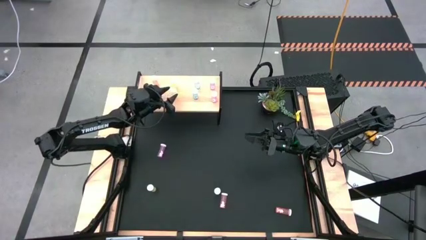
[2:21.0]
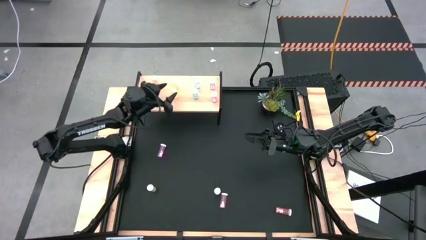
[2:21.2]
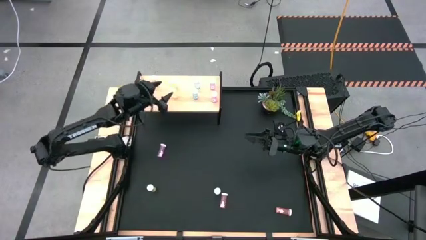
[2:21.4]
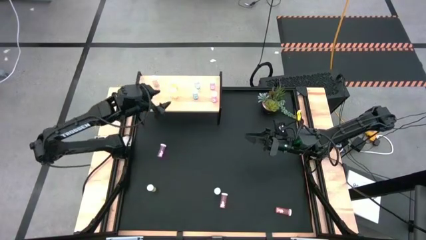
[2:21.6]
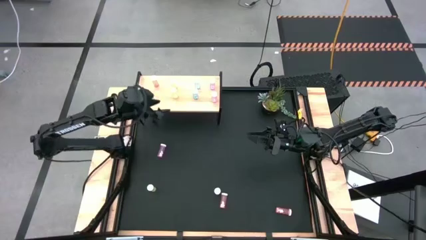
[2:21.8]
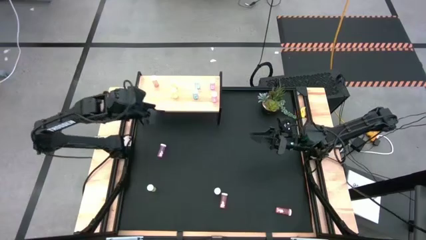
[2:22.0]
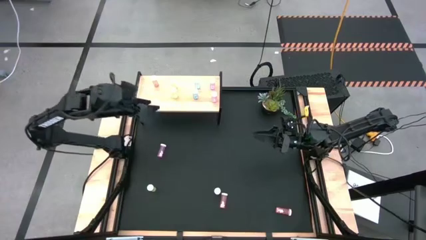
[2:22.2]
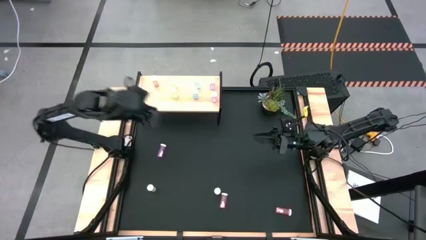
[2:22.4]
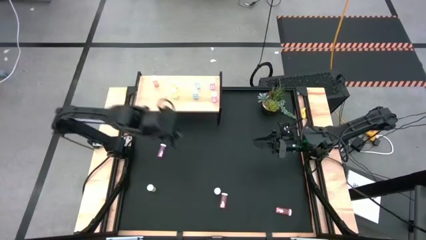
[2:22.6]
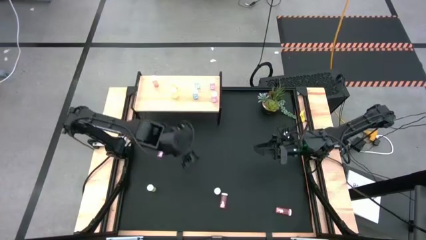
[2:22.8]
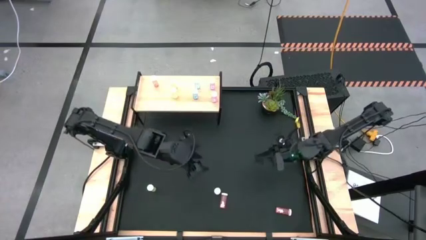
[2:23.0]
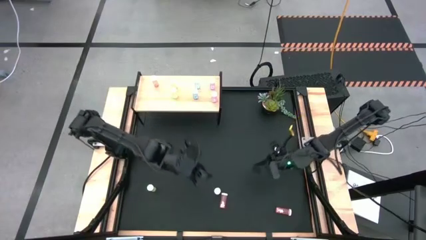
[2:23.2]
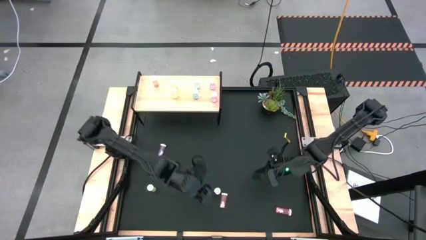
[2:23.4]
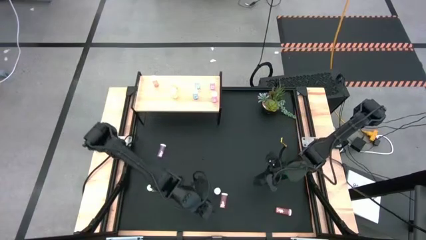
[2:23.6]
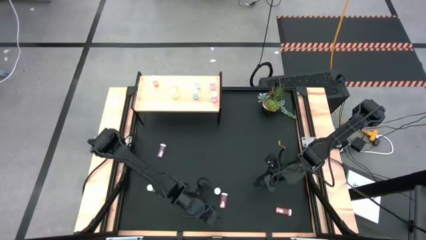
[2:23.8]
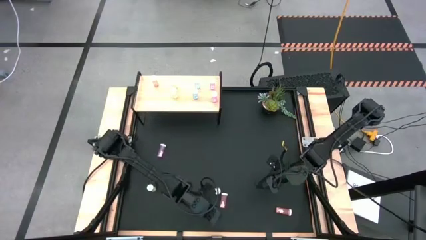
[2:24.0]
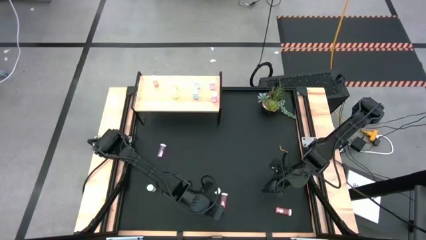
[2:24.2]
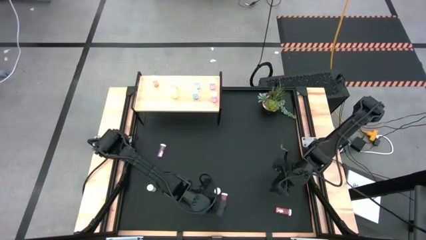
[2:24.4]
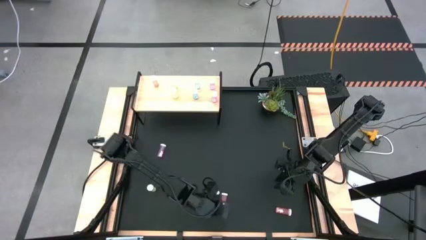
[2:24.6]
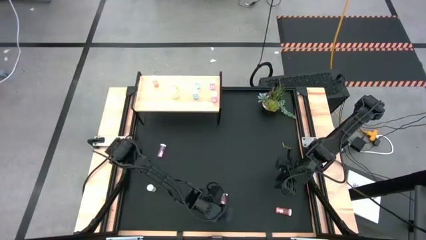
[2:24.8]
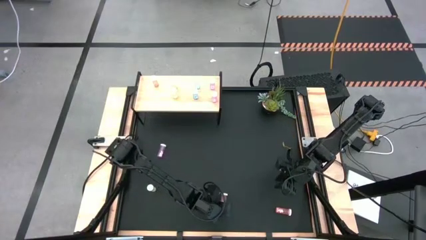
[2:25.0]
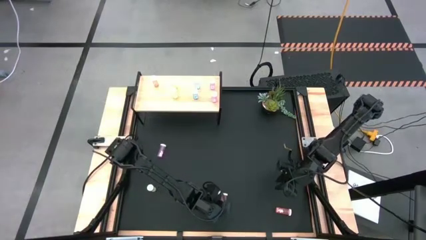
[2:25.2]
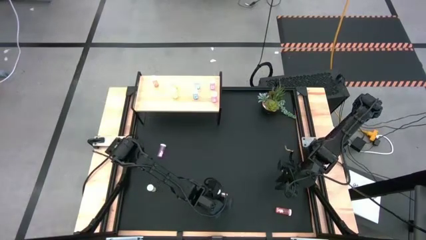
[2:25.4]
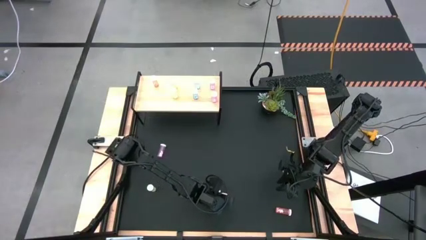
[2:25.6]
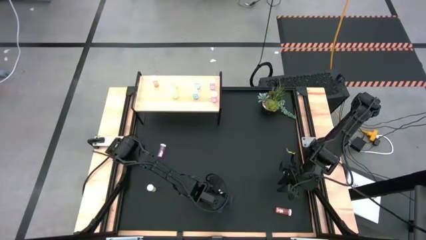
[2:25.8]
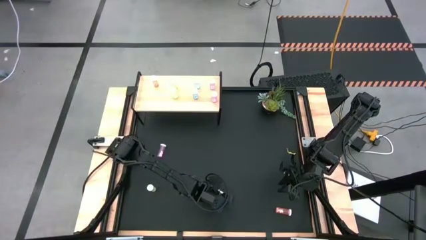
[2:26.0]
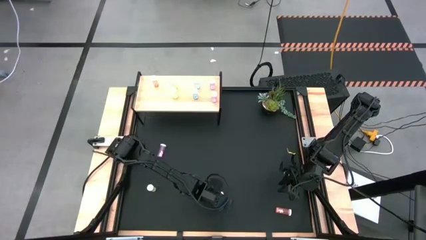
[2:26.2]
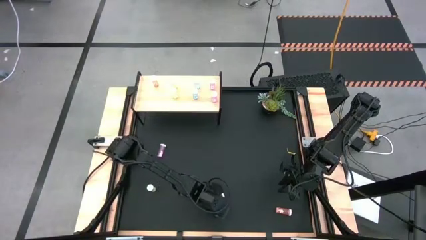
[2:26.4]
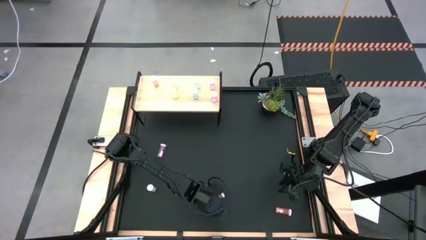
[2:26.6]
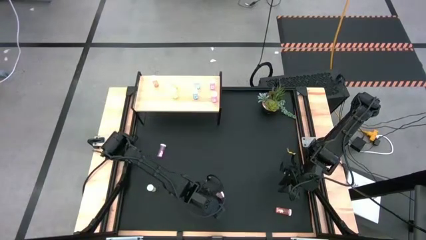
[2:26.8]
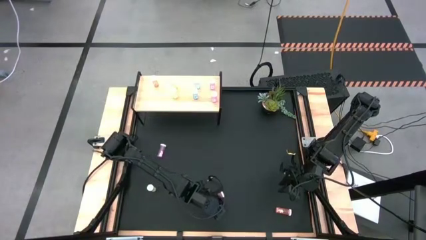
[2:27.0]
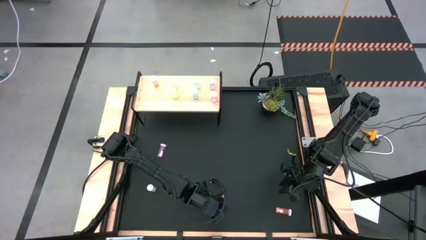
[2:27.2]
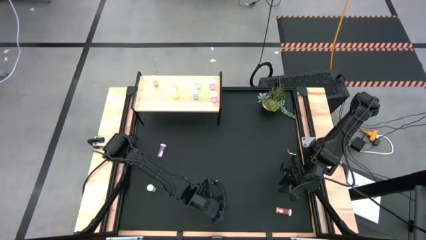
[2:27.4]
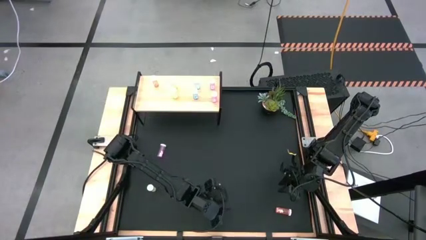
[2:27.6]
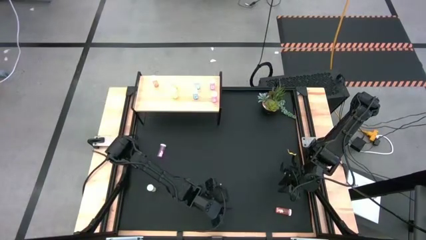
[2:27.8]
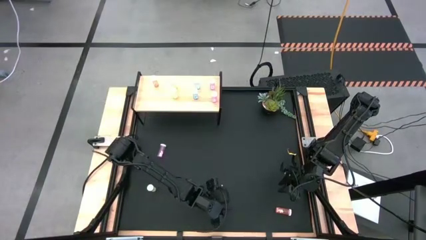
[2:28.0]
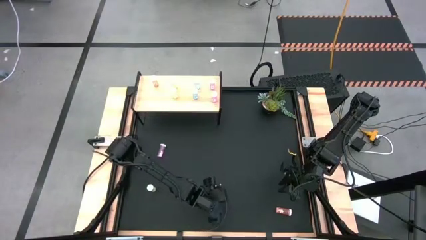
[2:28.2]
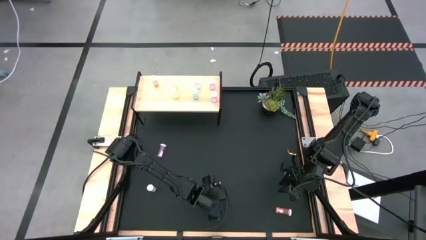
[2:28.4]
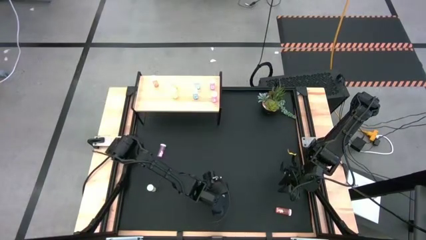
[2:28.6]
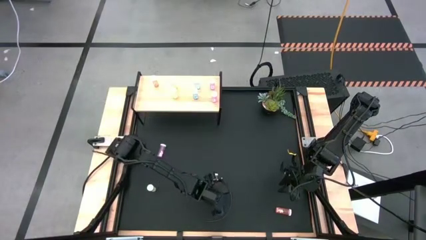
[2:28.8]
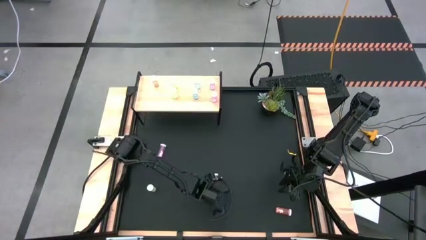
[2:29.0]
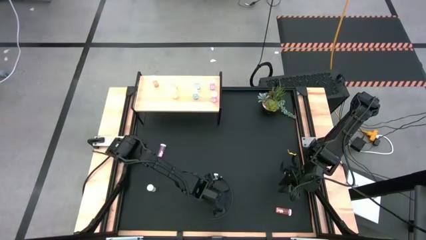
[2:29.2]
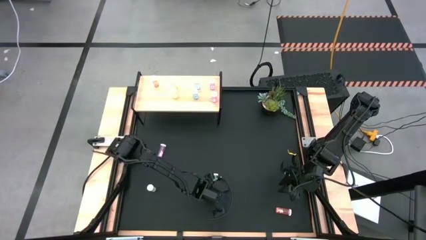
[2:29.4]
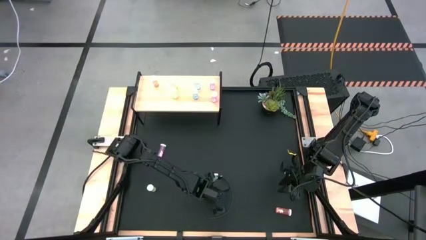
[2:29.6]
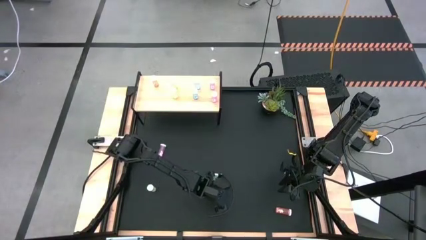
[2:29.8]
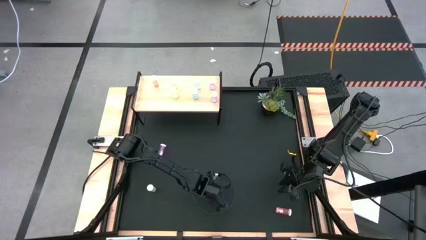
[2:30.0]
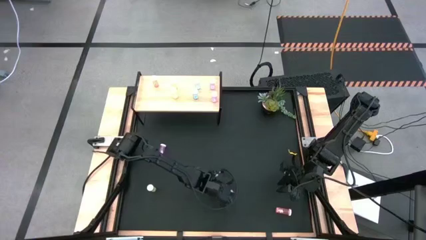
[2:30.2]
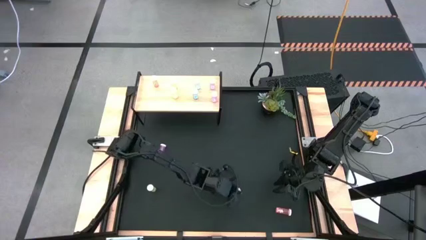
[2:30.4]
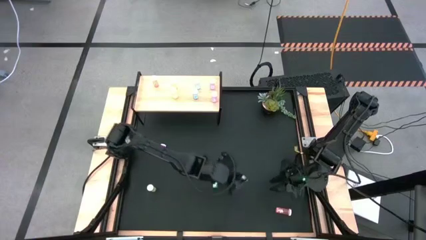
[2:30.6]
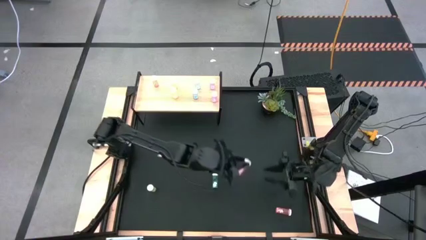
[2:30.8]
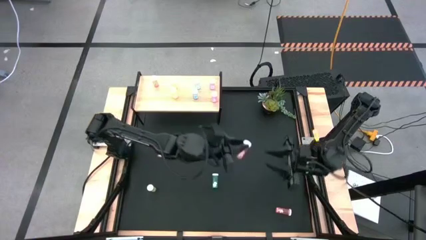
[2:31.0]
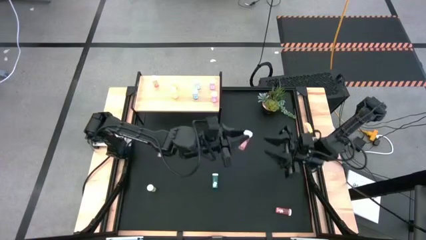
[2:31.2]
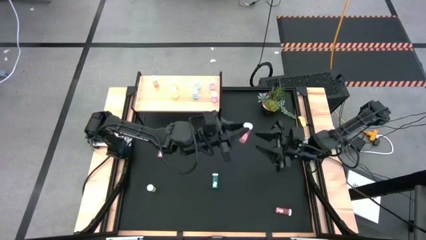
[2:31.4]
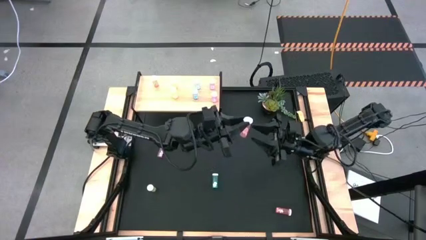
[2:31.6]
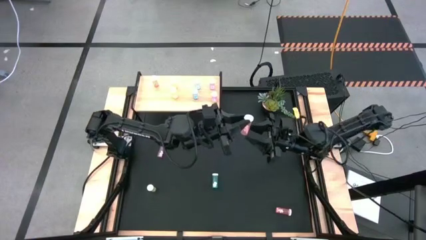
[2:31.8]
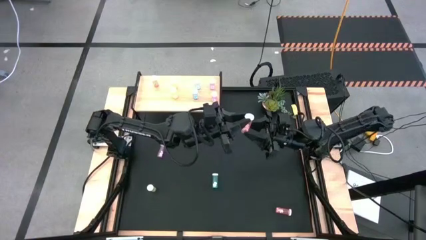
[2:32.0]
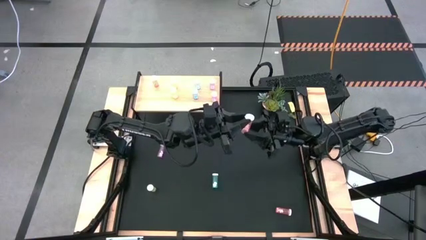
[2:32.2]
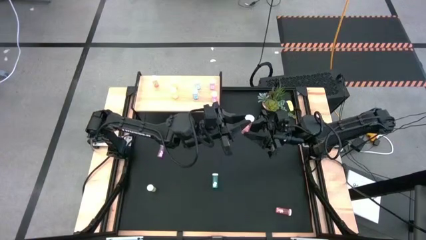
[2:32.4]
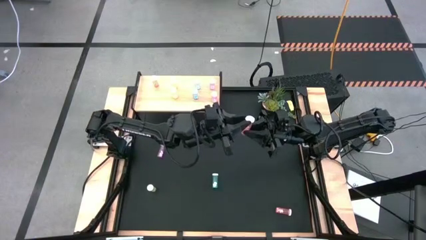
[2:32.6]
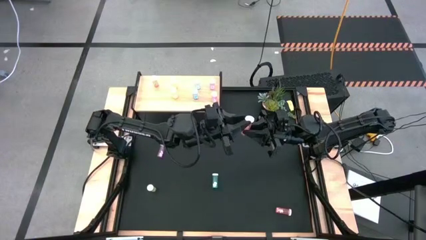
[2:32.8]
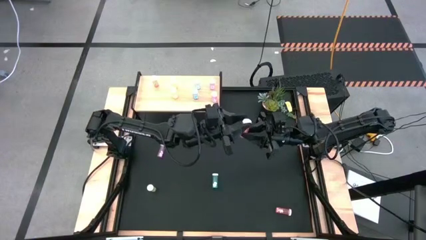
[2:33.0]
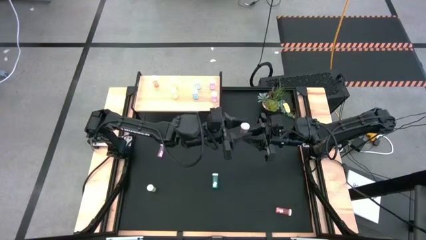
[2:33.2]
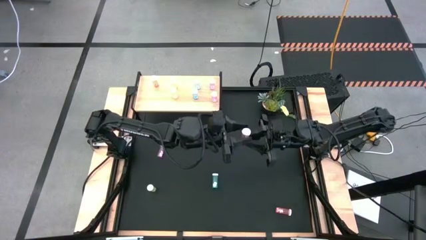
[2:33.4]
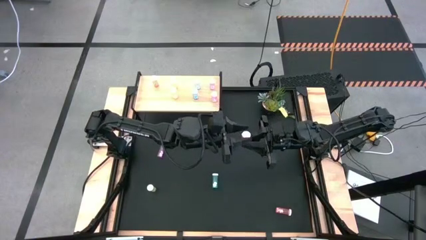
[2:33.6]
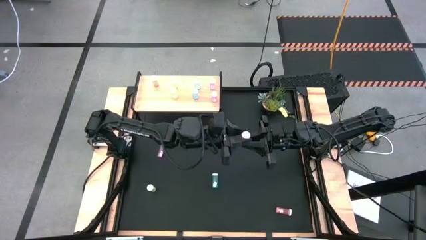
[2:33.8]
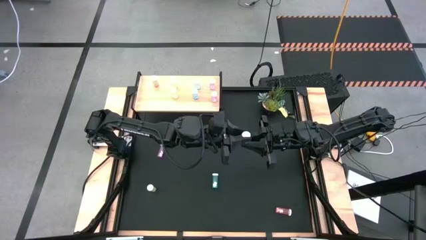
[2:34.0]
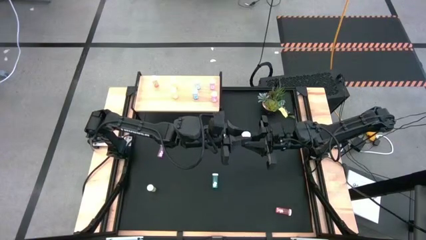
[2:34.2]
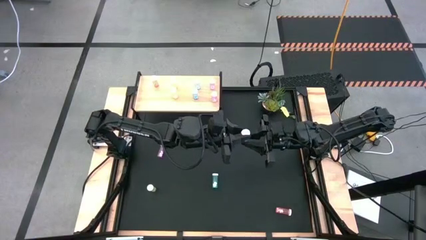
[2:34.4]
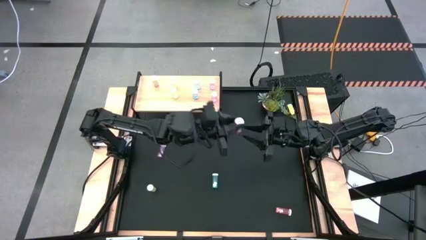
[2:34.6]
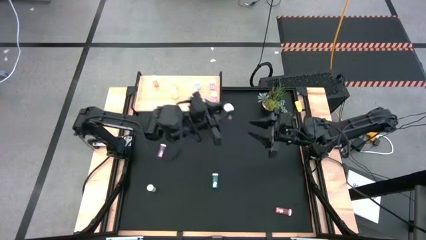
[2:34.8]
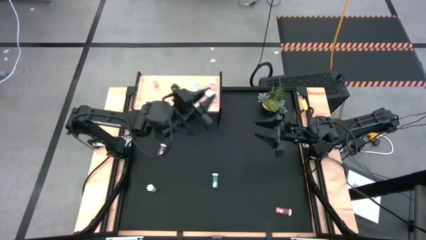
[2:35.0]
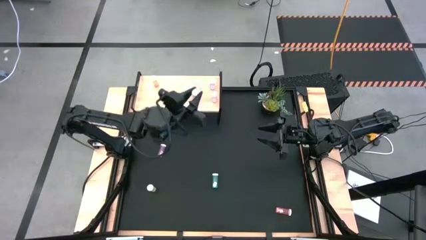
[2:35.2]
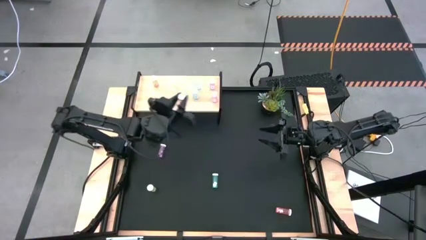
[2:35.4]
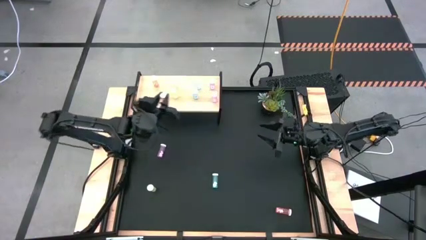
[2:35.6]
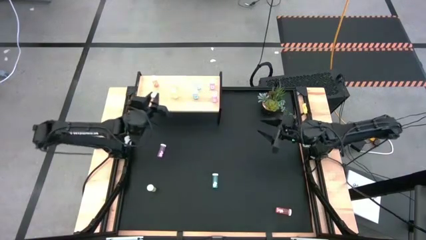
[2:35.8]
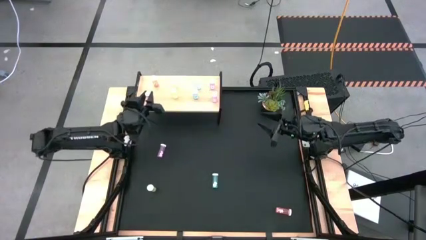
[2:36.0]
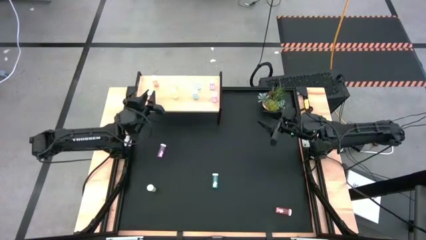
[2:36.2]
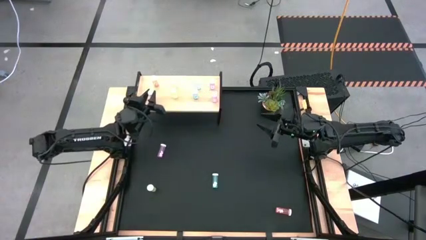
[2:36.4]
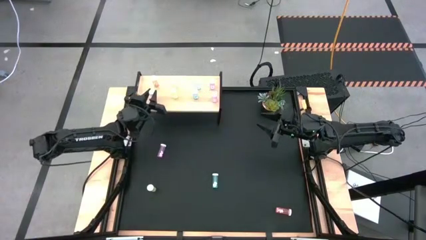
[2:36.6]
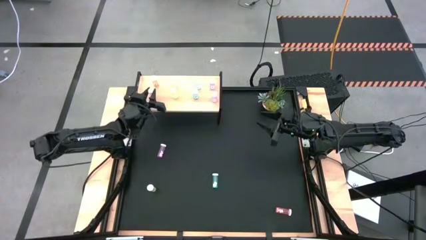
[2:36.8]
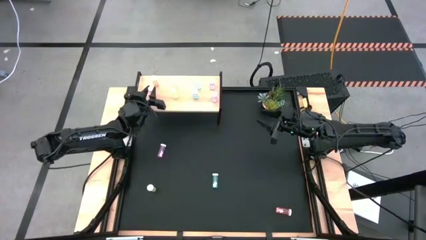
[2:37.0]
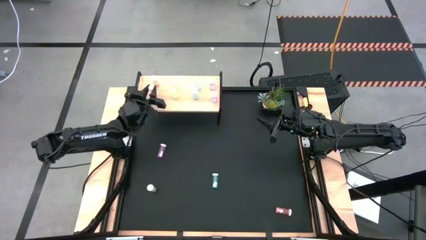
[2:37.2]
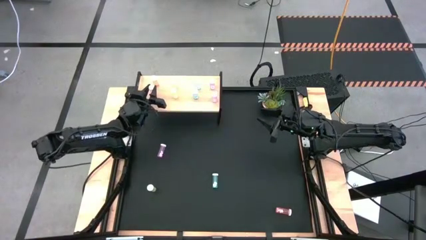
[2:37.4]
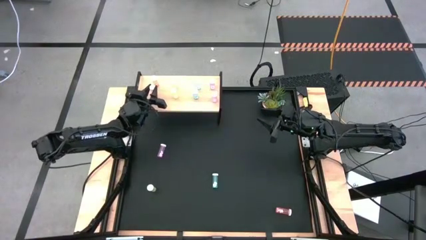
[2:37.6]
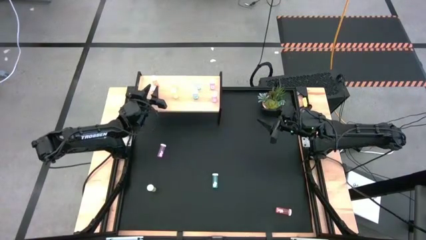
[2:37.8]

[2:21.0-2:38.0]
Task: Pick and place medicine bottles onto shelf by color
Put the left orange pill bottle on the shelf aligned with the other orange pill bottle
